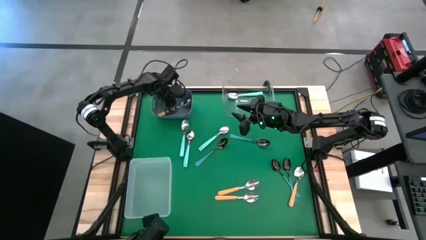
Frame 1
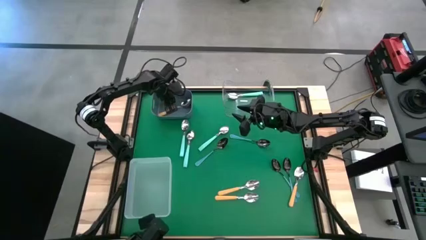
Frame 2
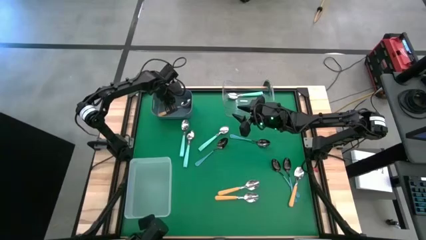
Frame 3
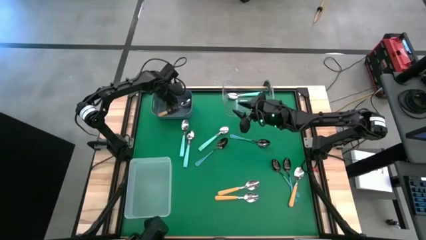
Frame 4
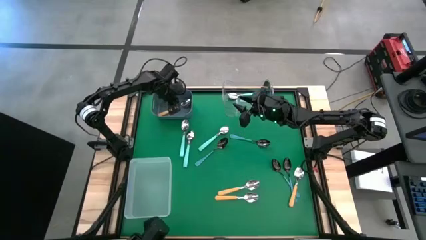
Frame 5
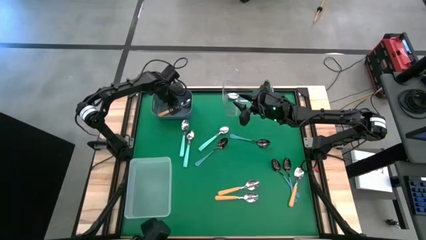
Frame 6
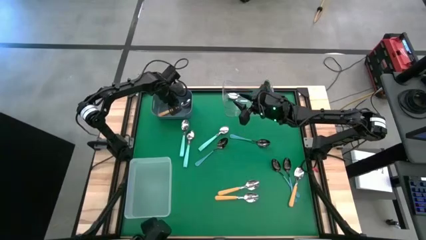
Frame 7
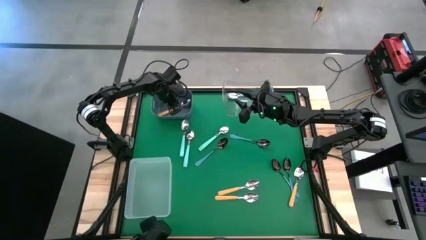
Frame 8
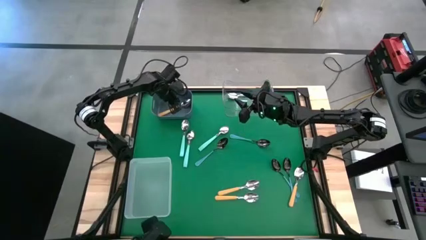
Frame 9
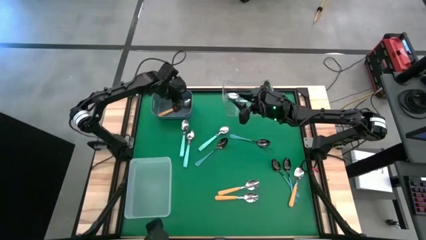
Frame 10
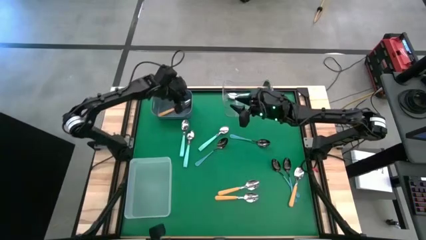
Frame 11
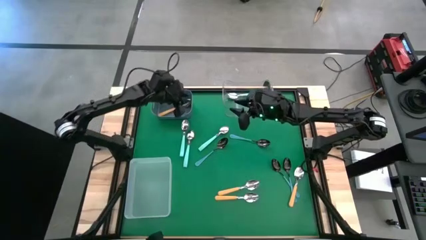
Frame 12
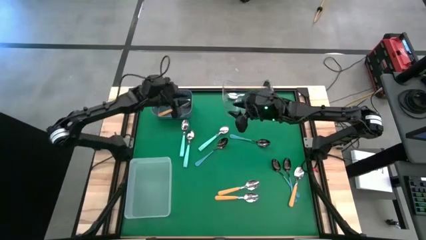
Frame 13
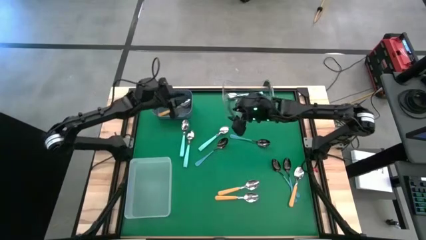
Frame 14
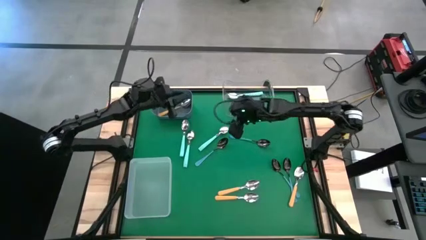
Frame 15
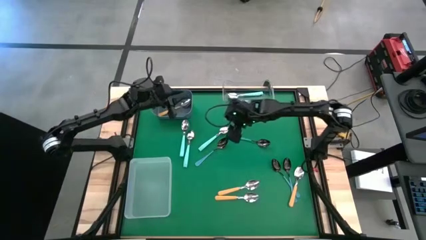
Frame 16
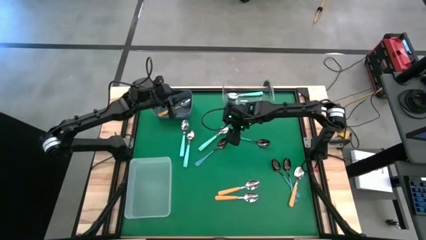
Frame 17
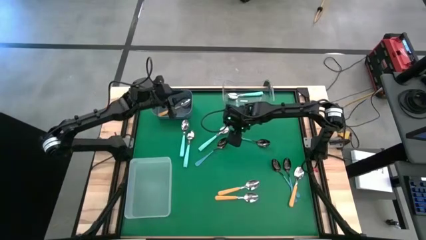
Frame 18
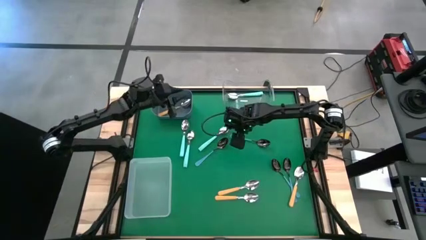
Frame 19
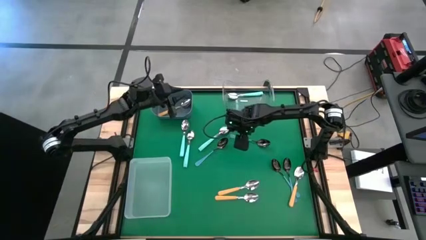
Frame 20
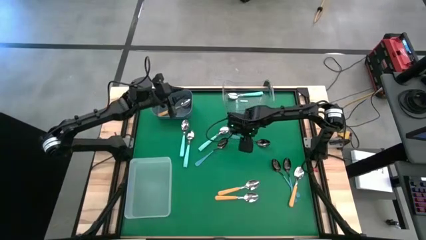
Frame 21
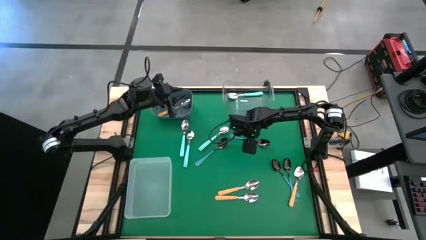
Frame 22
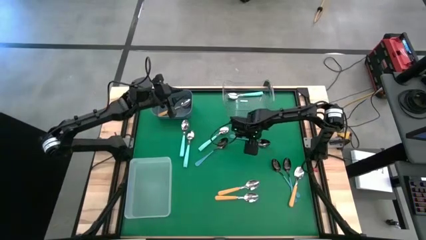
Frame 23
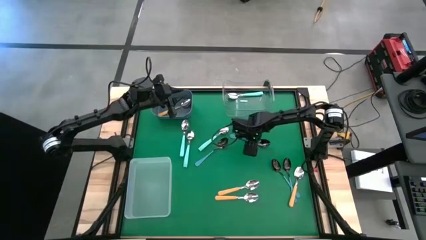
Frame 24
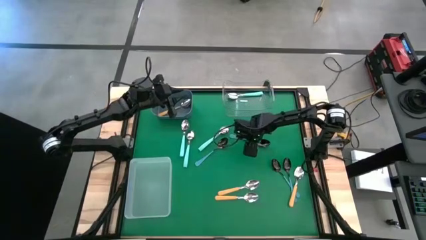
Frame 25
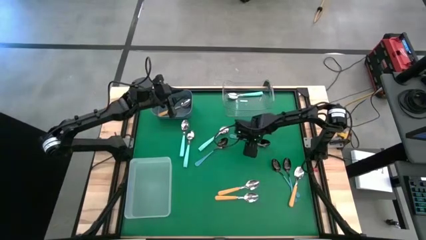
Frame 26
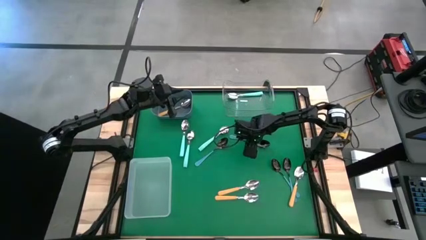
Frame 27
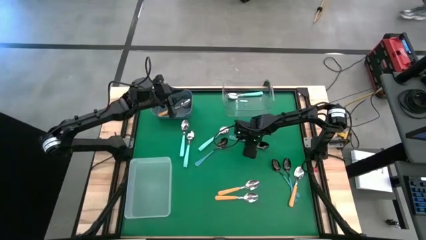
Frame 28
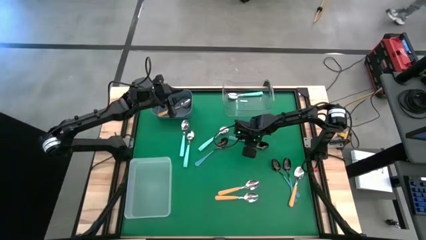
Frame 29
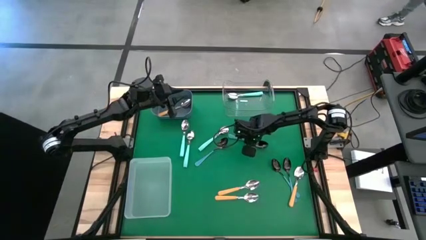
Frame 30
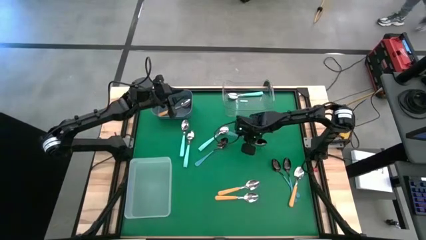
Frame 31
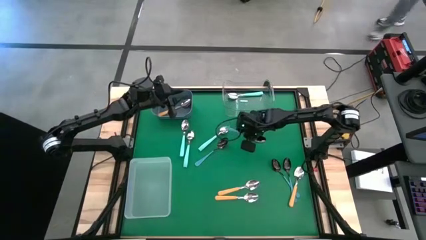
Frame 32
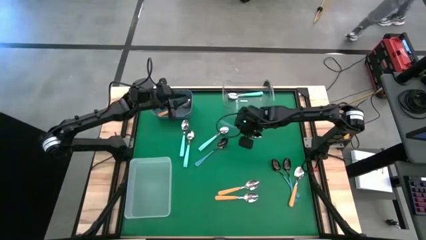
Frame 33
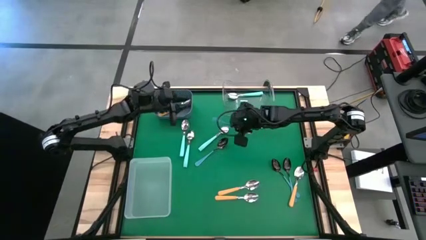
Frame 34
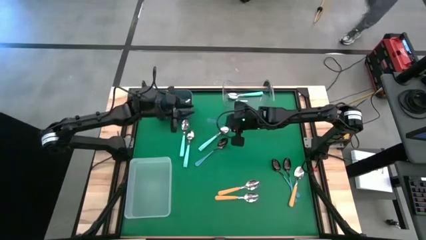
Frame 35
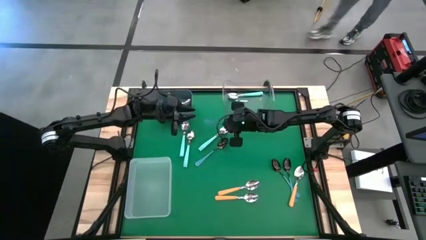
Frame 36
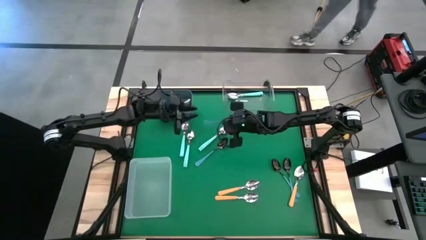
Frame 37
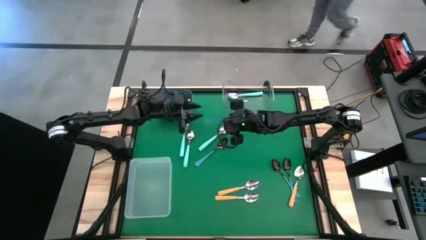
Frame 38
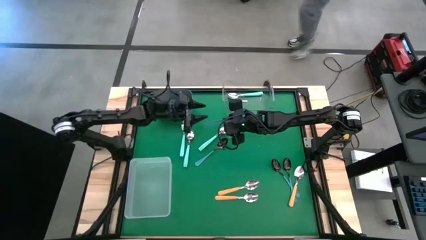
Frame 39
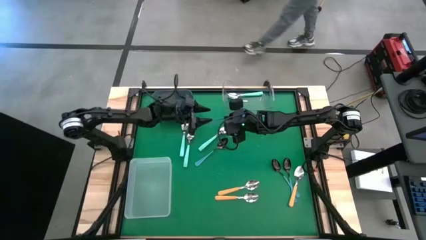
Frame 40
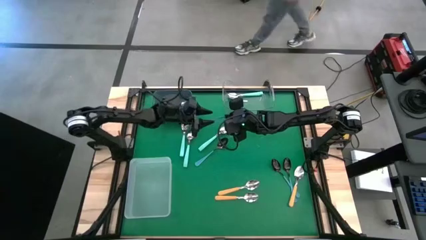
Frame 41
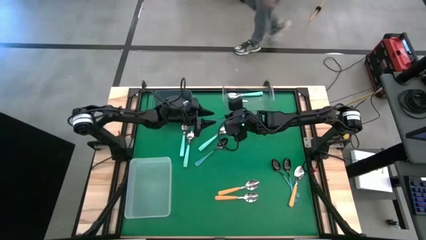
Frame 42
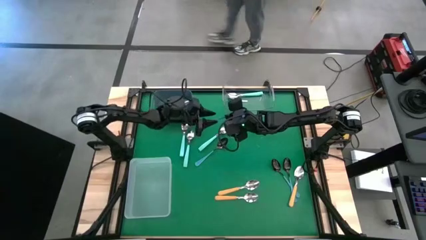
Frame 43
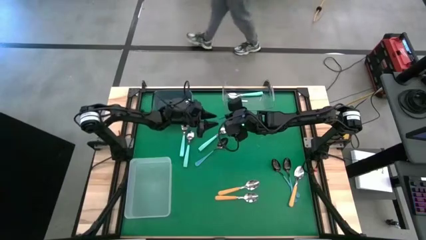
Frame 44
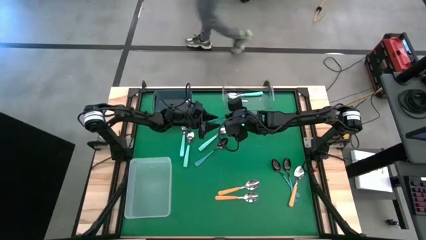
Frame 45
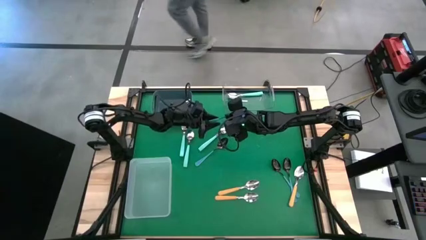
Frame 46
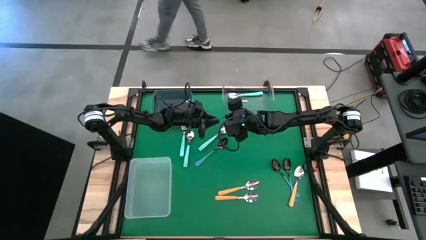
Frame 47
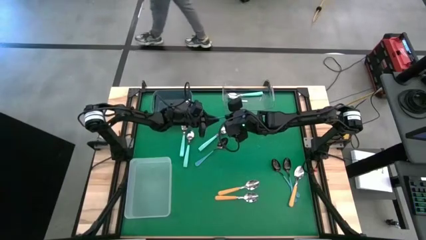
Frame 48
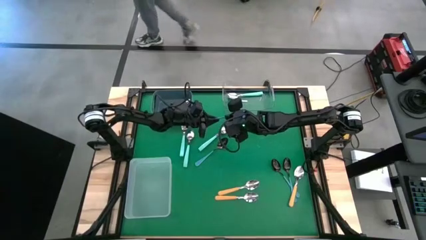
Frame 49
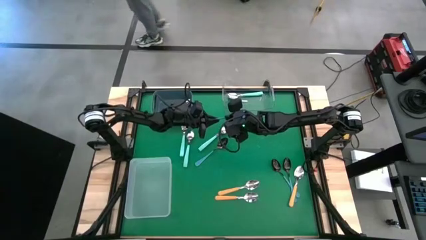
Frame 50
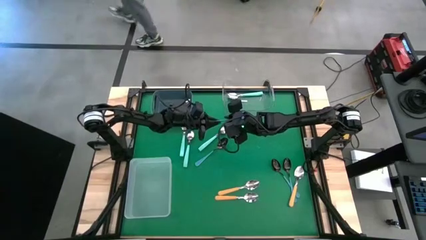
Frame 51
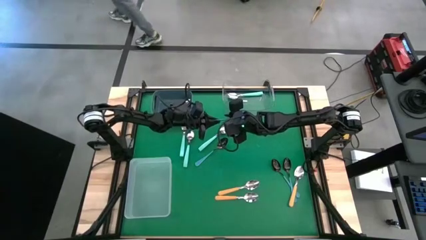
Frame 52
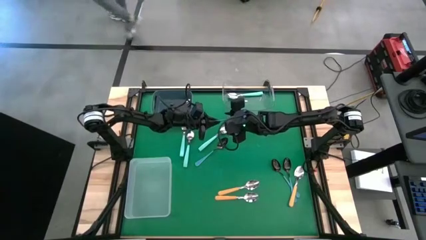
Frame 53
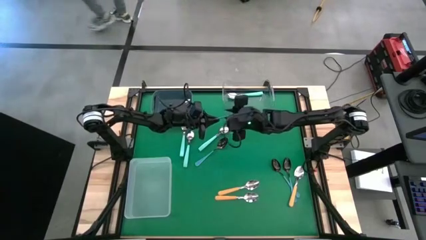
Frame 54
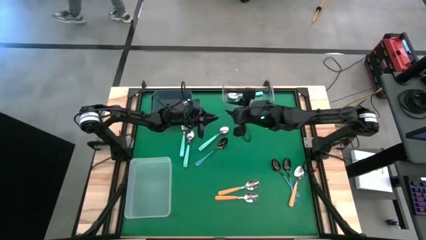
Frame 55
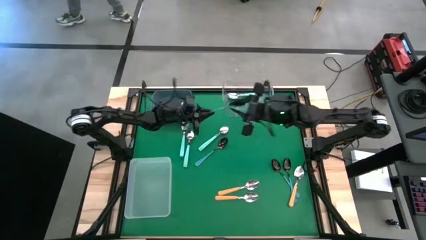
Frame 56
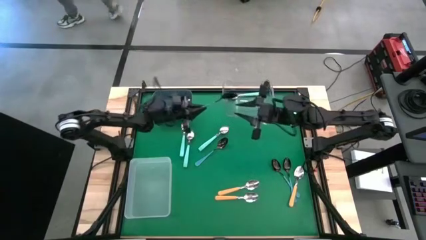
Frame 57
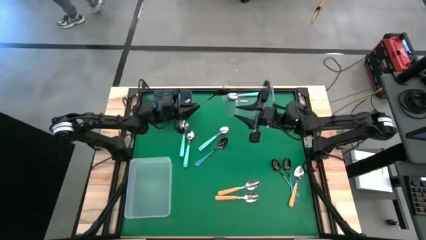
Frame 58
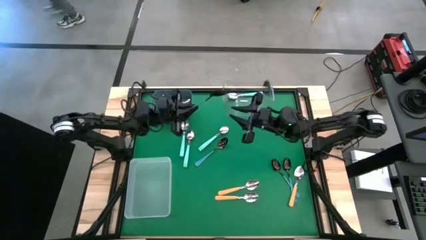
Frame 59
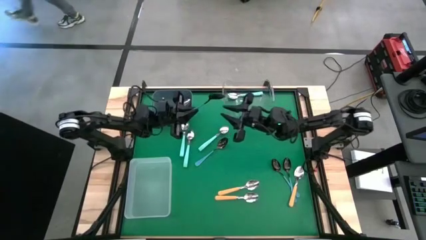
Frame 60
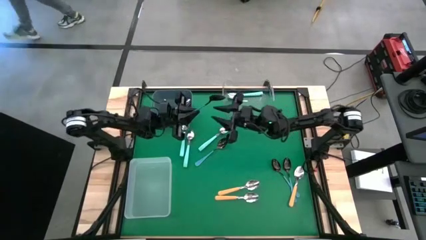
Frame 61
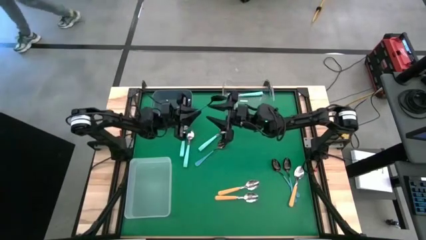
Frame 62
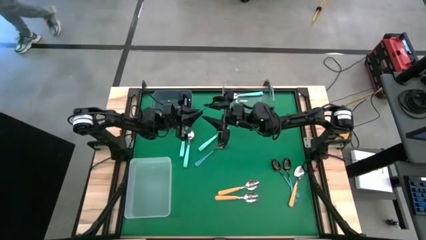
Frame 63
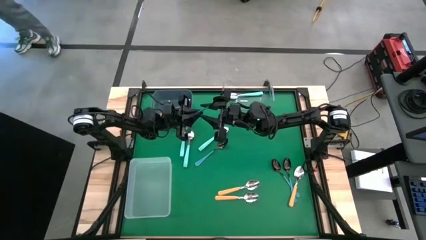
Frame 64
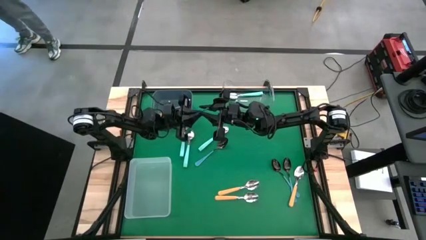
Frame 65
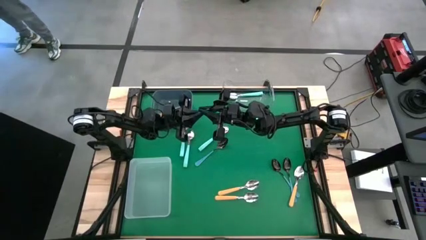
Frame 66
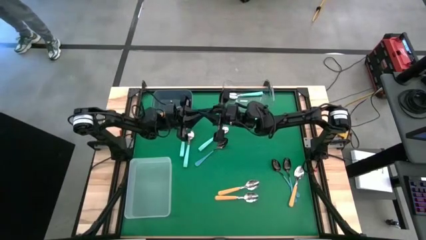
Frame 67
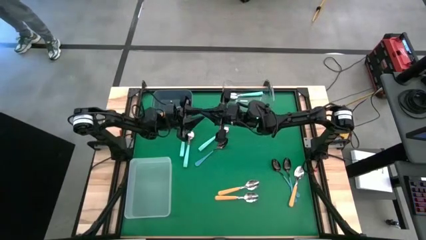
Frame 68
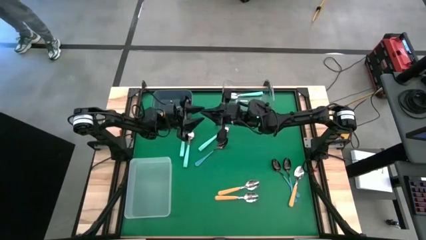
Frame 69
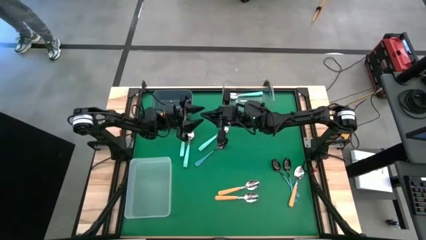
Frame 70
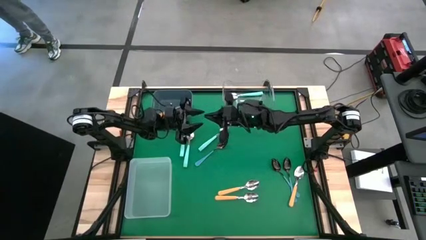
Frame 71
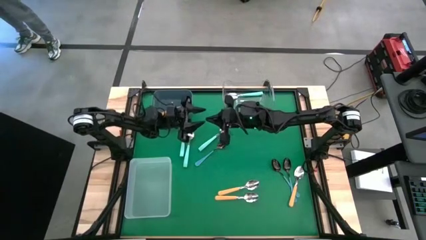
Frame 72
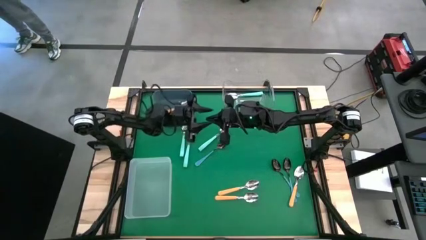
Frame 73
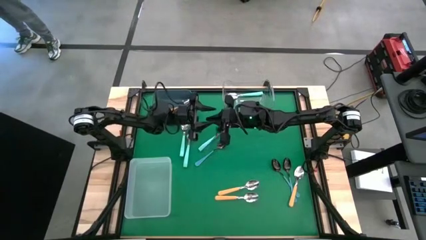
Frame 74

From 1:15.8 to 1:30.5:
Task: Sort silverware by color (type)
Put the dark blue spoon into the white bin

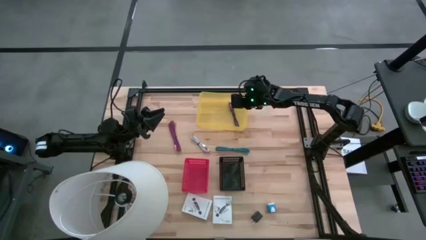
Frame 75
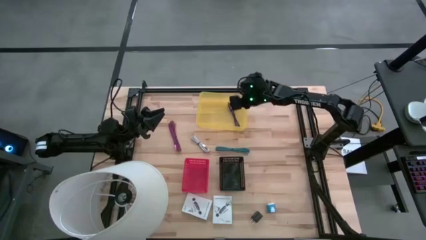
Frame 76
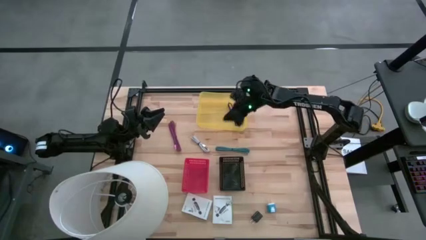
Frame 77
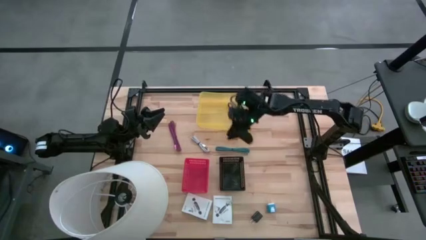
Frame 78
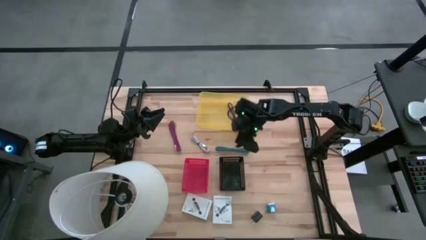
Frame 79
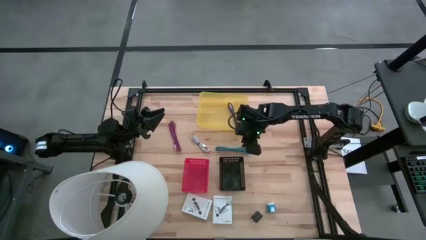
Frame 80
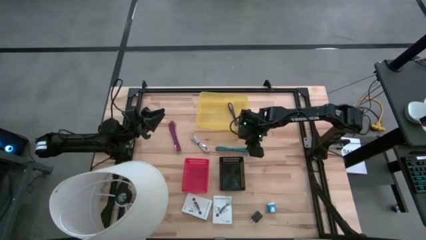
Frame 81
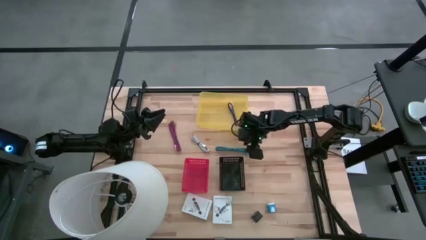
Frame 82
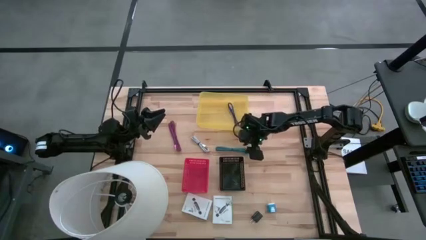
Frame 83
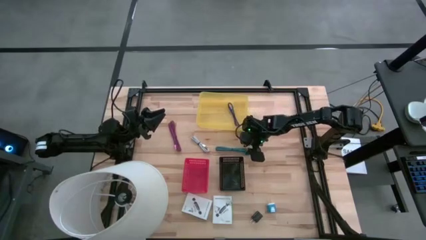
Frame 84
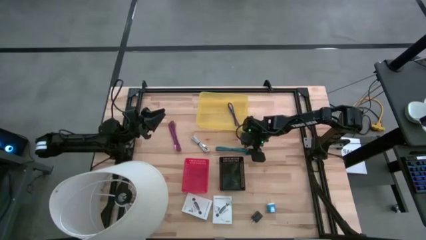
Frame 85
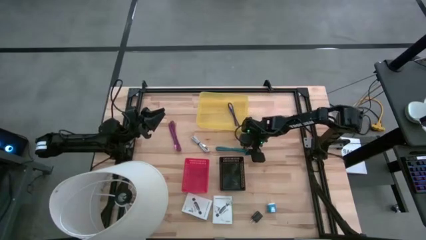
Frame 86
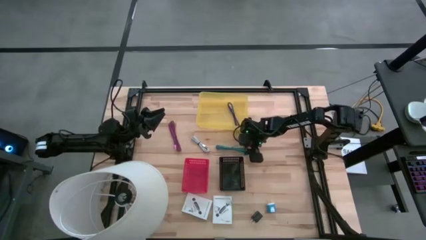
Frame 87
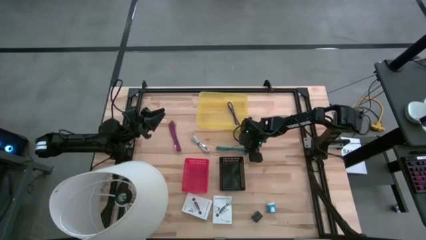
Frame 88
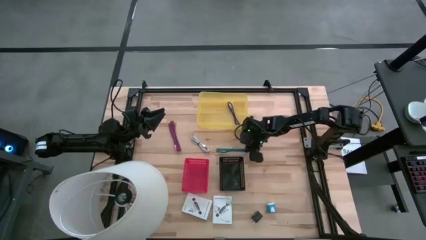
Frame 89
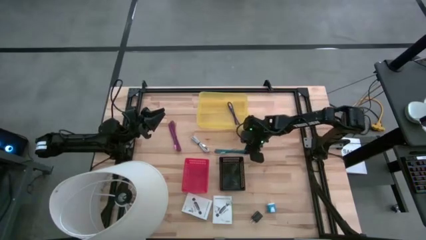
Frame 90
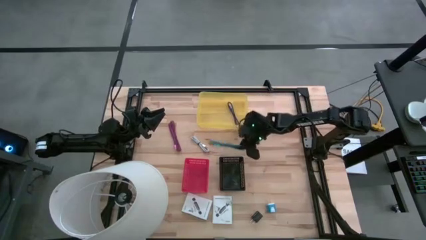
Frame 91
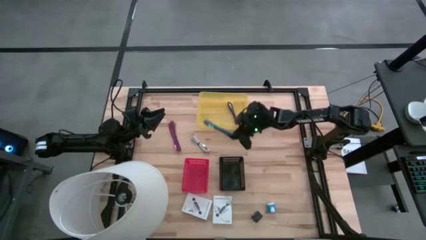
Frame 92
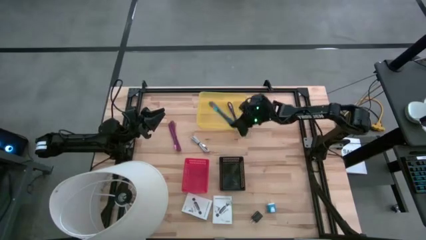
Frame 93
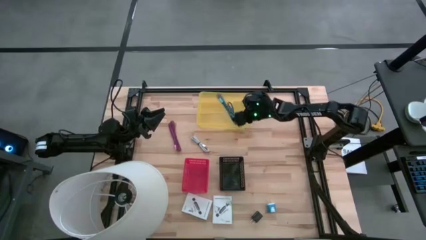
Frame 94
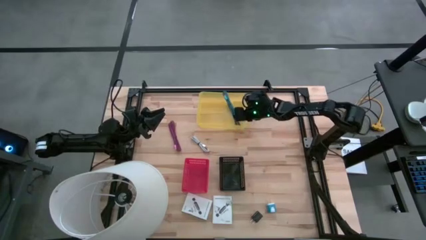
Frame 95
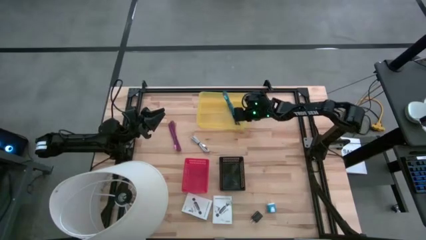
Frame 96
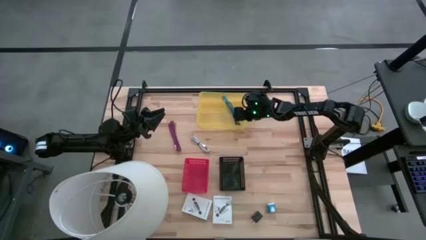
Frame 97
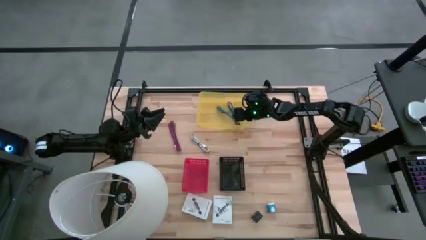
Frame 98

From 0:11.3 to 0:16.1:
Task: Pick and place items into bin
Put the green usb cable into the yellow bin
